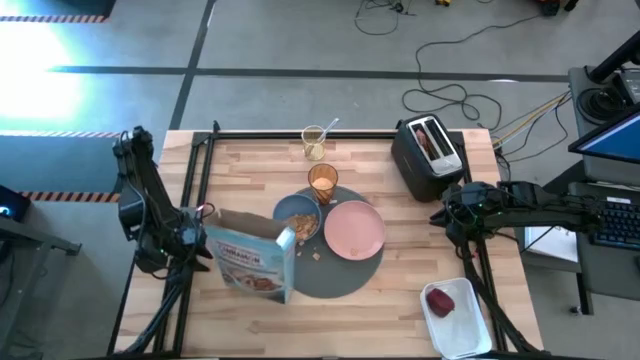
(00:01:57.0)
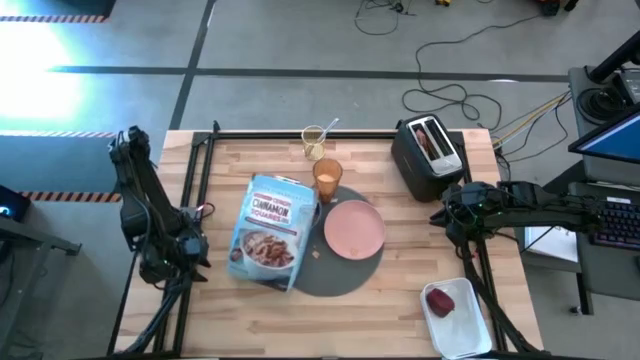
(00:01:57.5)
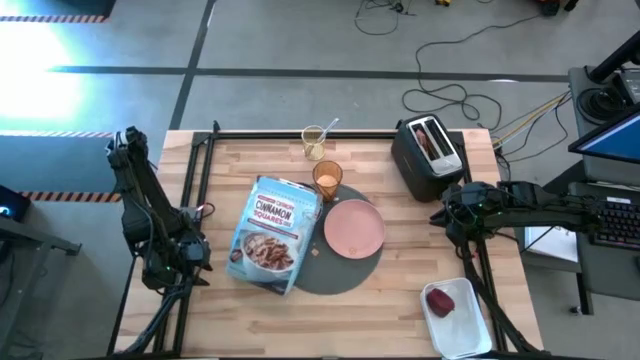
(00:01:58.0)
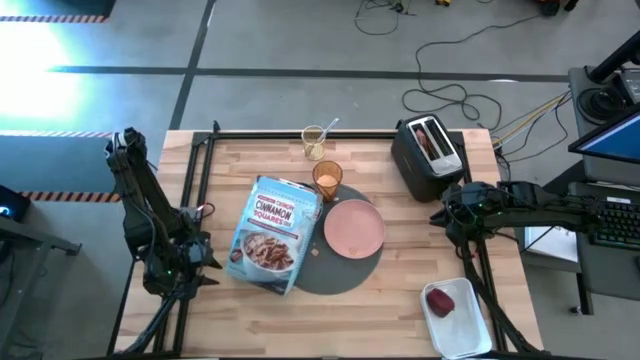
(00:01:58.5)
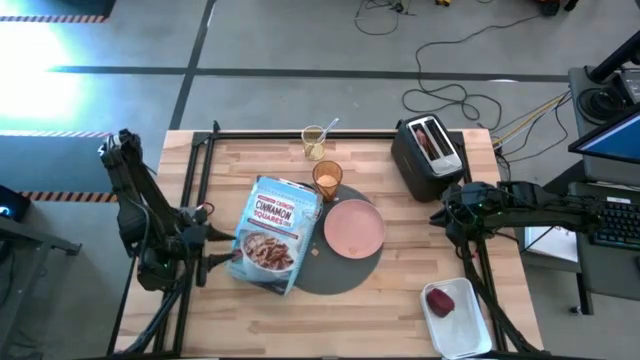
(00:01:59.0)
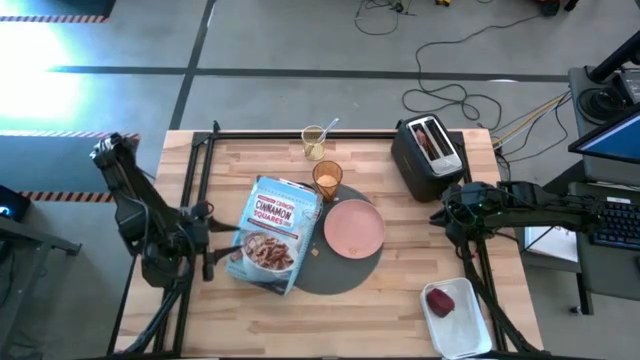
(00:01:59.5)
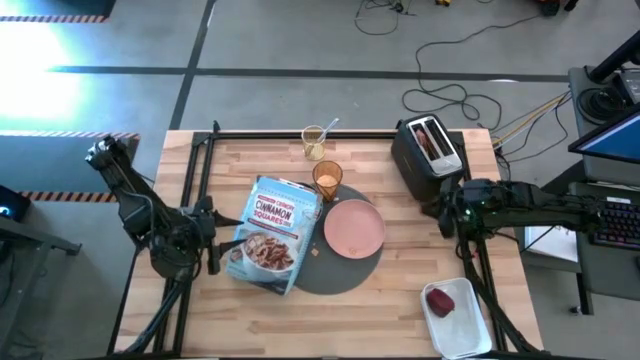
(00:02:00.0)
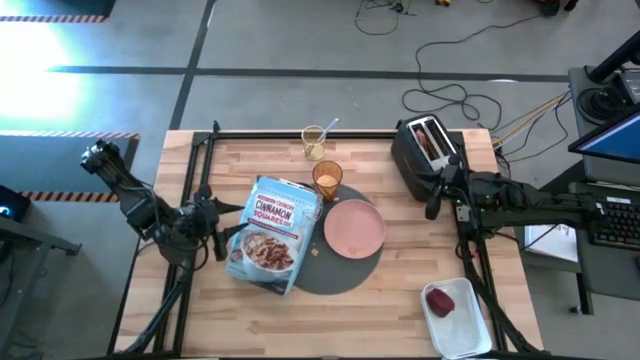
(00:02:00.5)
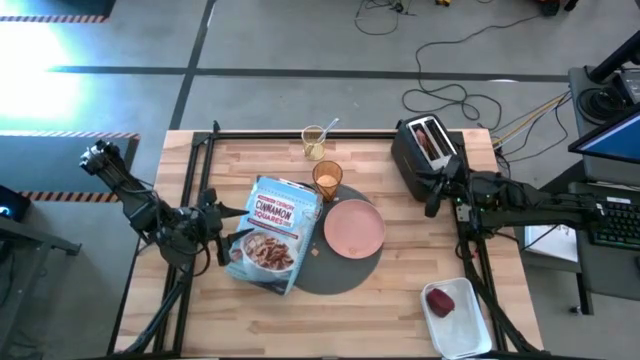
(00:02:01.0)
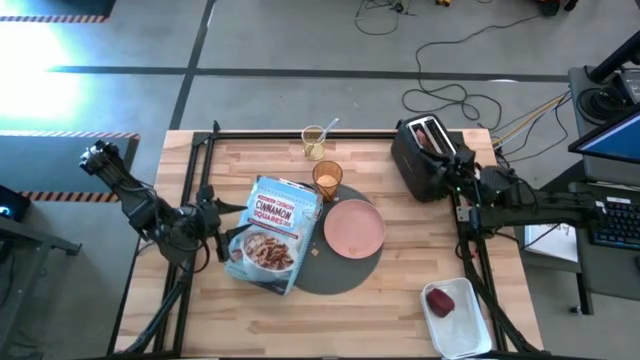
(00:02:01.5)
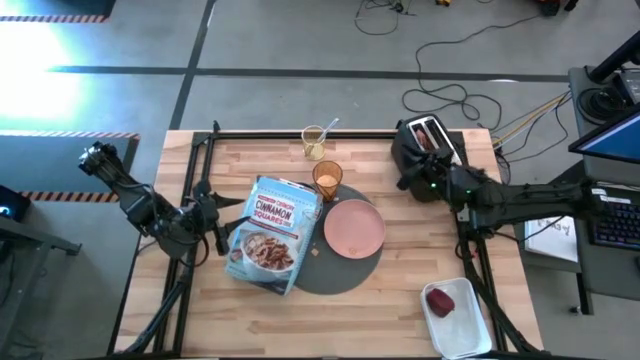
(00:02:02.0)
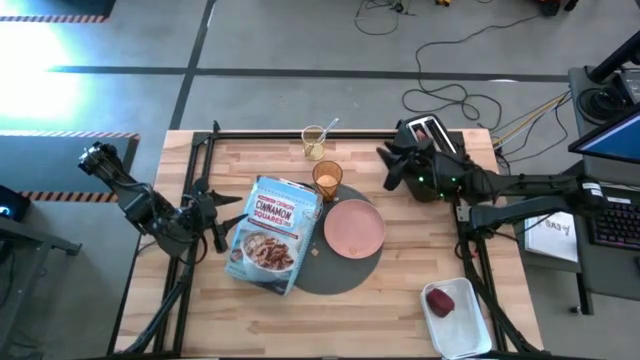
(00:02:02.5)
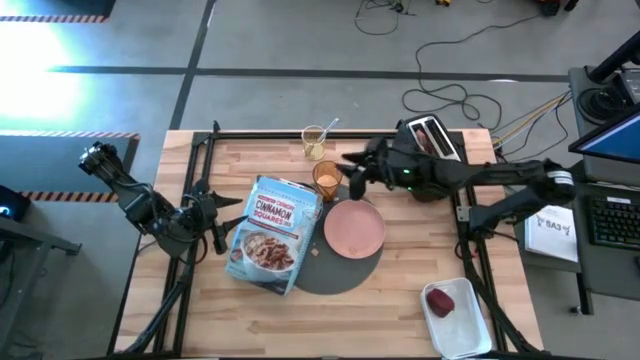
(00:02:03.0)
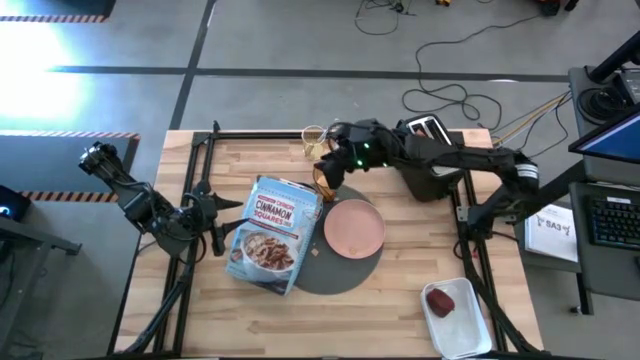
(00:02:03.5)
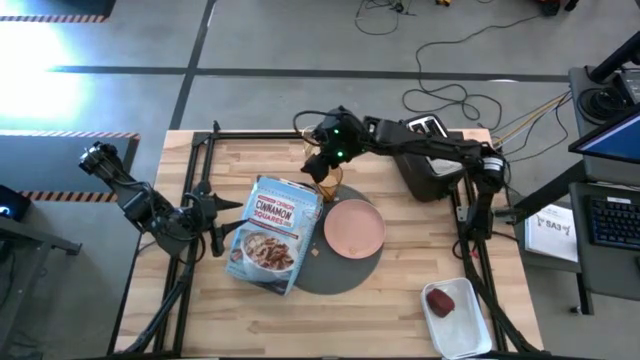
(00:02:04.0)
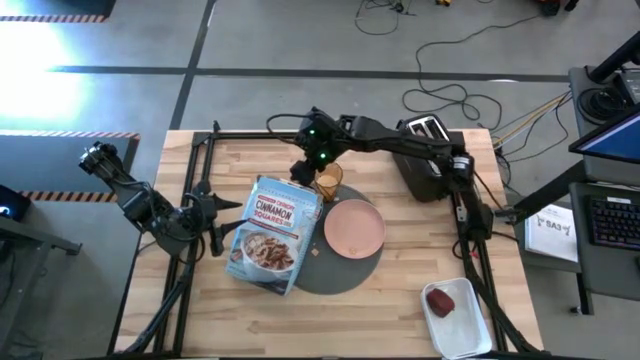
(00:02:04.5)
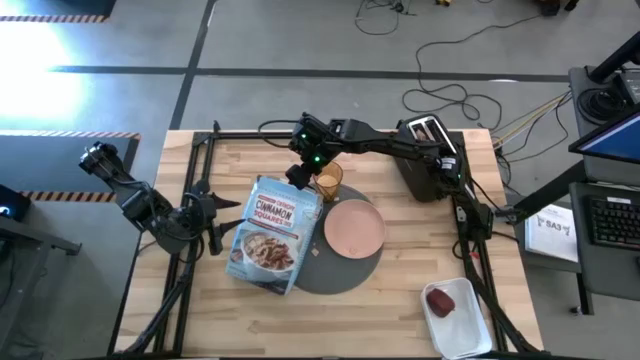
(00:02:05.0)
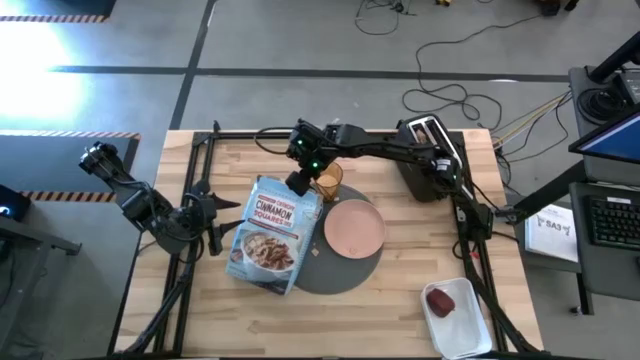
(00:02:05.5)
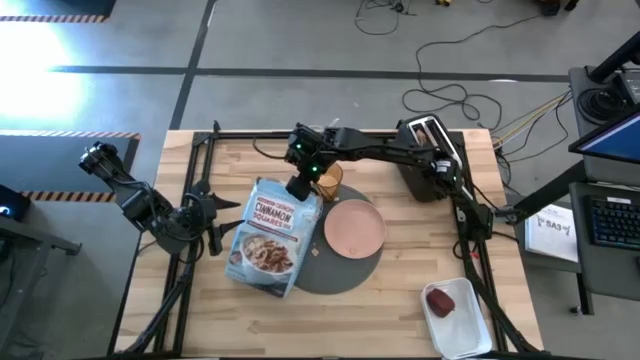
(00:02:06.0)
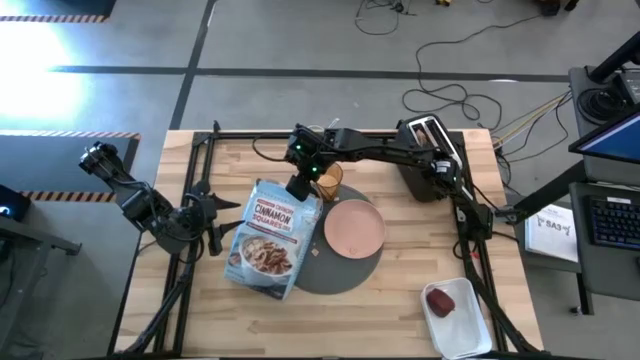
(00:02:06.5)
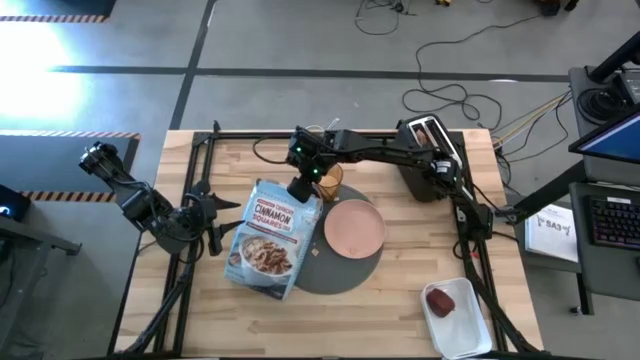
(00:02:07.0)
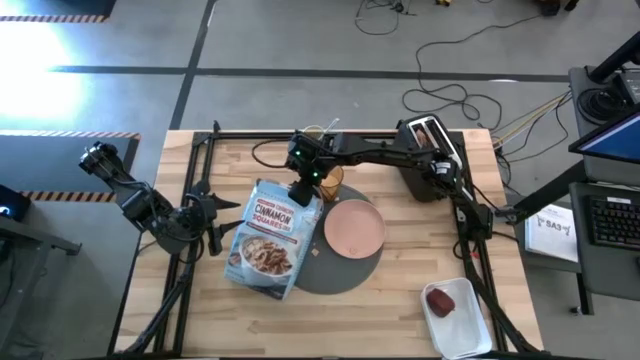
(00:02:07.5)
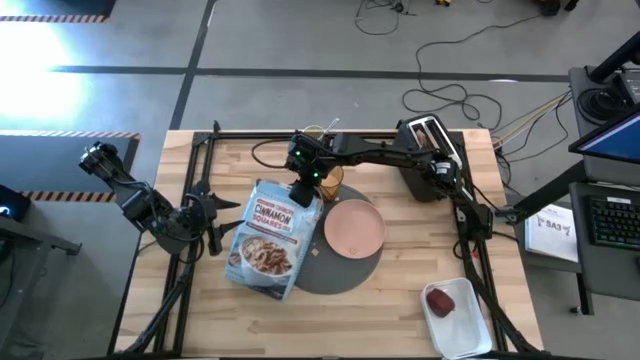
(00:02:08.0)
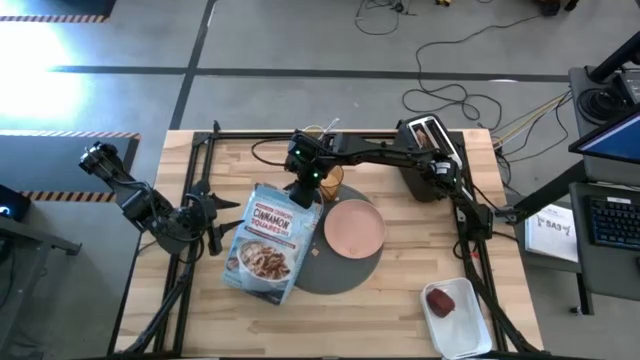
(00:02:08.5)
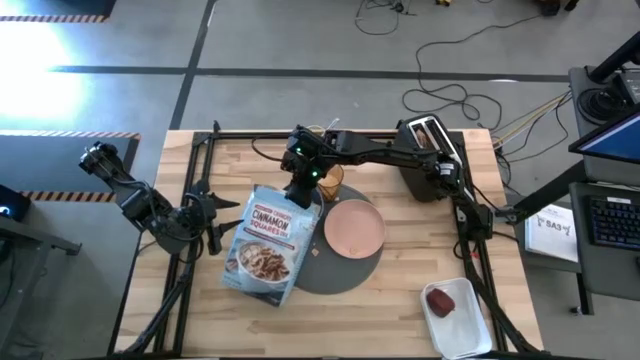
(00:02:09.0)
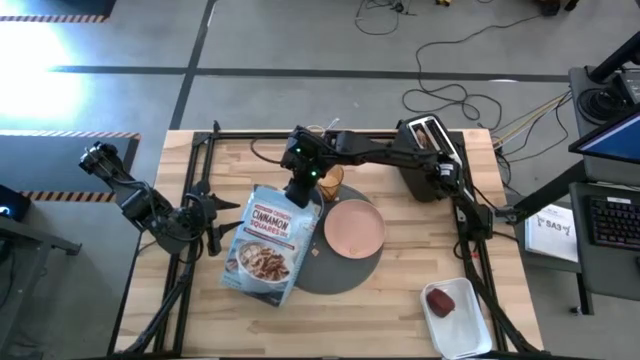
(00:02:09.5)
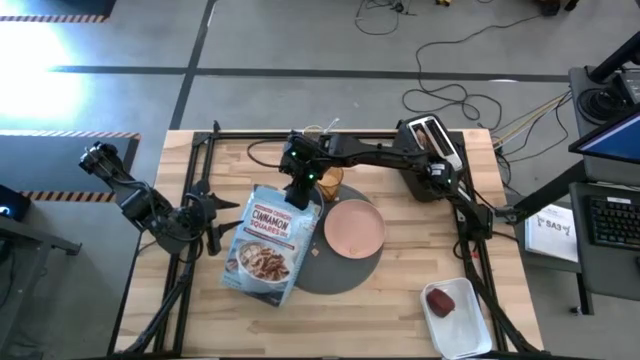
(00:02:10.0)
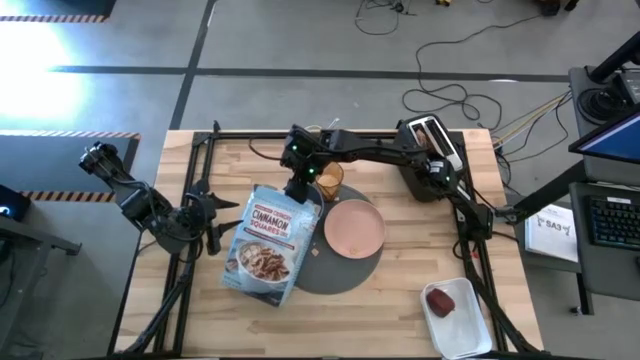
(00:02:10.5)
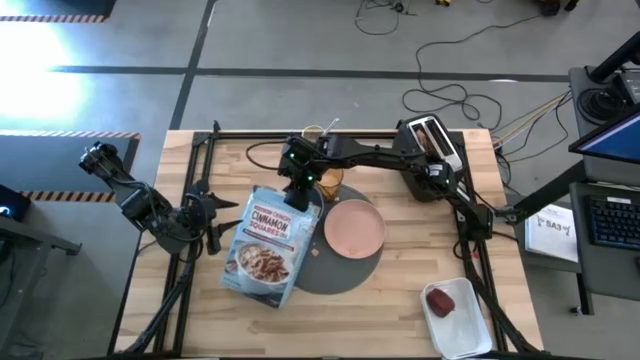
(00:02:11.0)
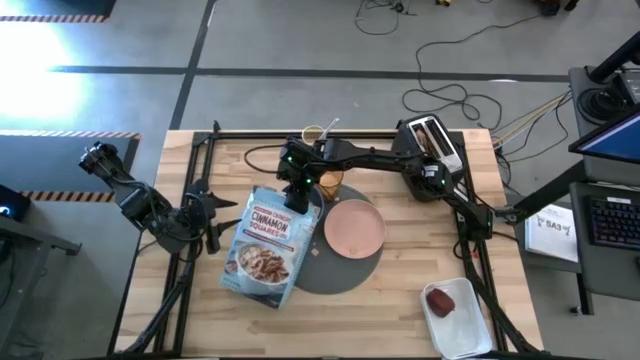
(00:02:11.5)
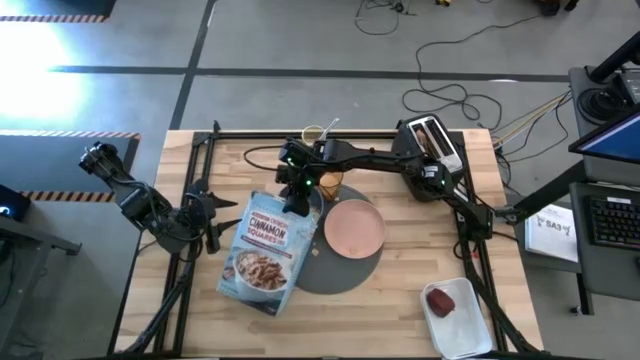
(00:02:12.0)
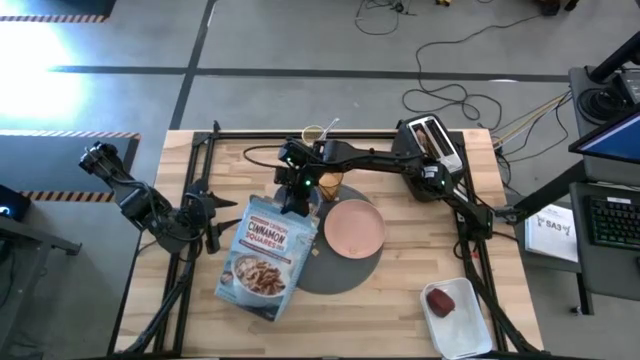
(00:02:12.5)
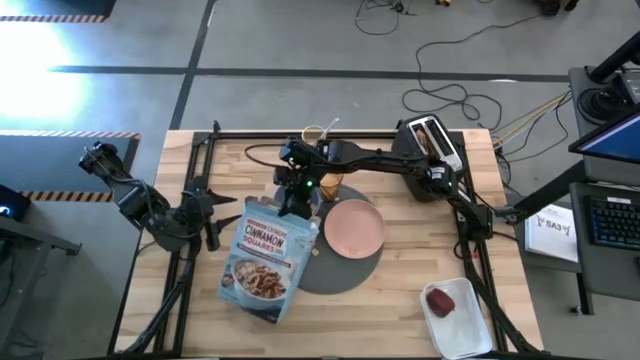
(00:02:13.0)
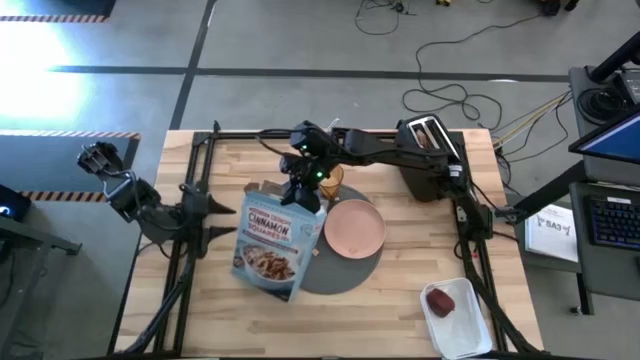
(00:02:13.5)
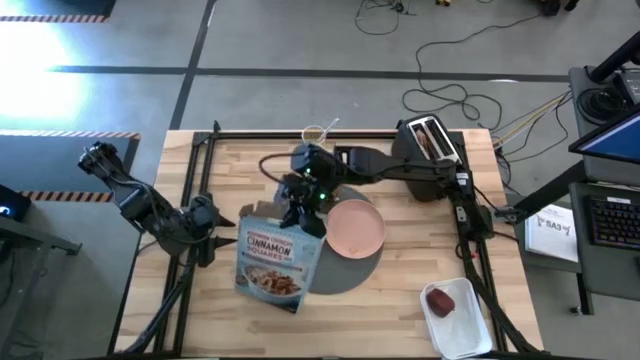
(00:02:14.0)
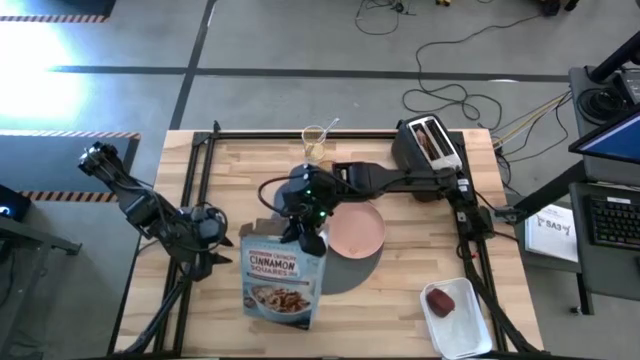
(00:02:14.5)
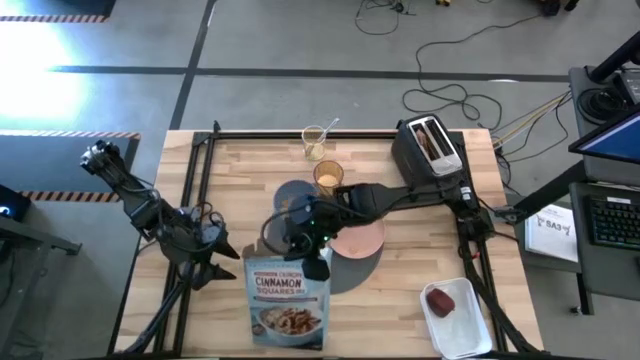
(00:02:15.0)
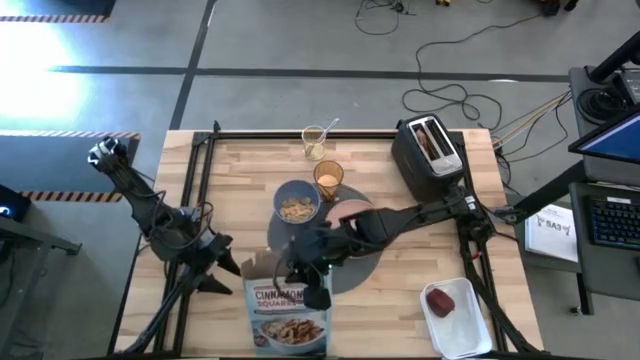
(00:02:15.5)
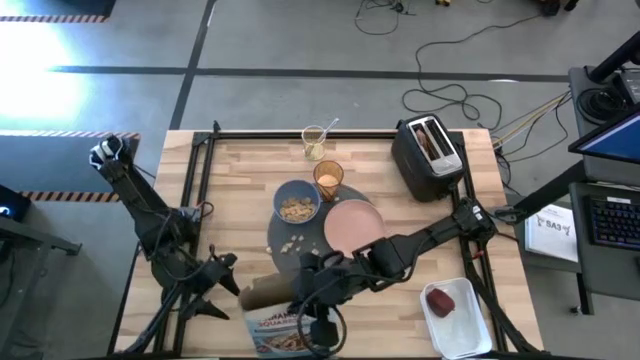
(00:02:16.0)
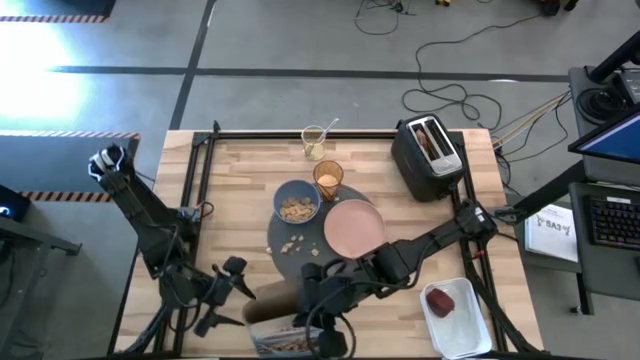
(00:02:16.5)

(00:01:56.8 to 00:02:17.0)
Task: Arrange a breakfast setting
Pour the cereal from the cereal box into the blue bowl
